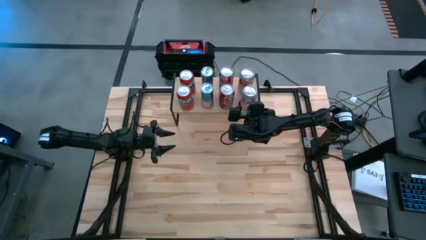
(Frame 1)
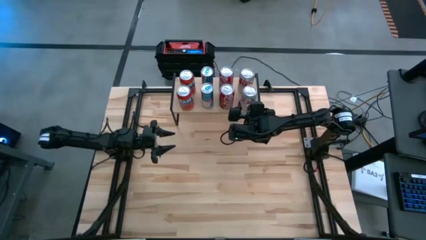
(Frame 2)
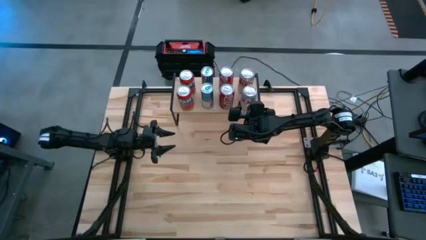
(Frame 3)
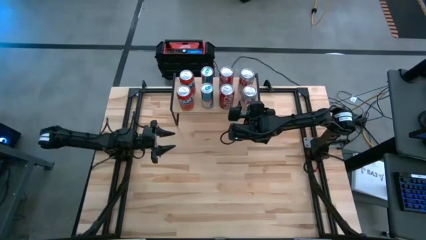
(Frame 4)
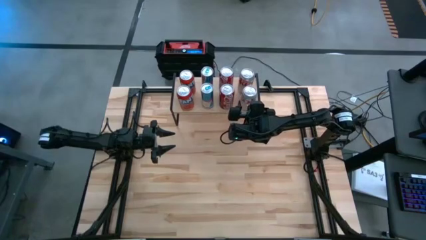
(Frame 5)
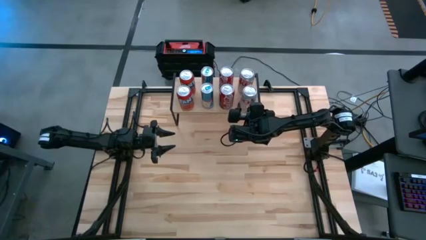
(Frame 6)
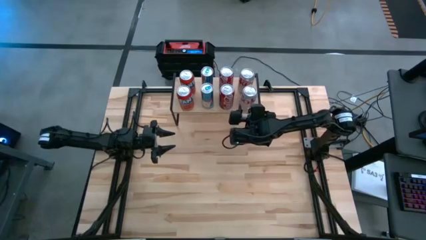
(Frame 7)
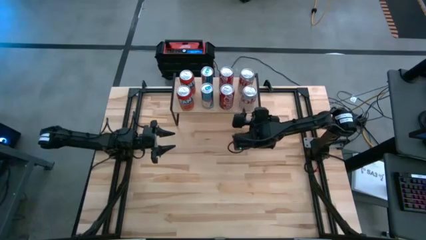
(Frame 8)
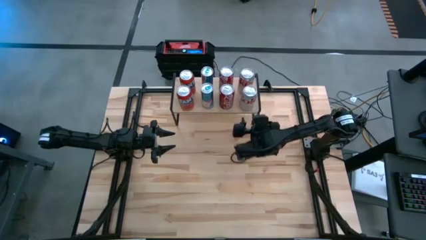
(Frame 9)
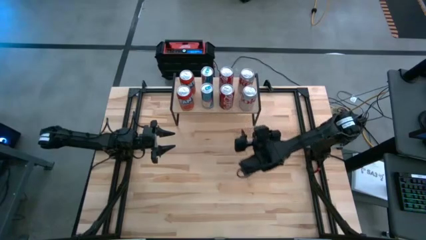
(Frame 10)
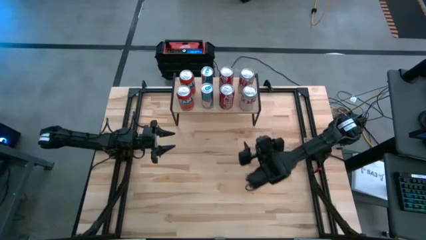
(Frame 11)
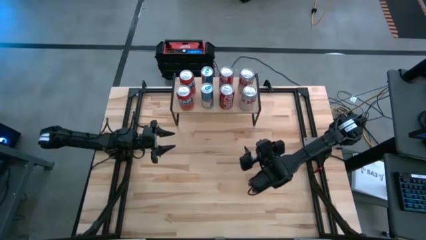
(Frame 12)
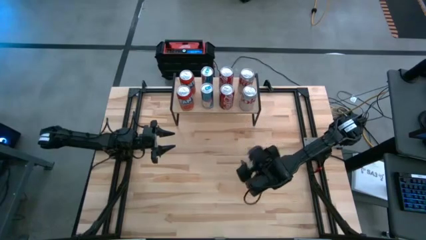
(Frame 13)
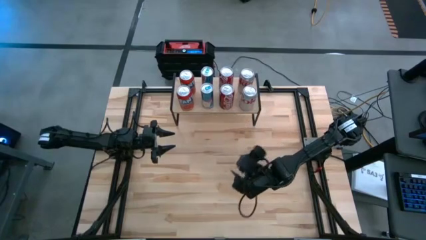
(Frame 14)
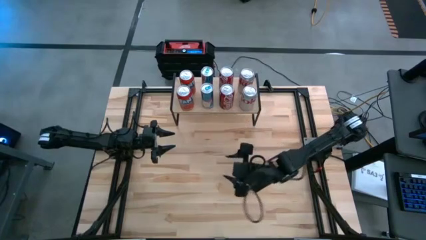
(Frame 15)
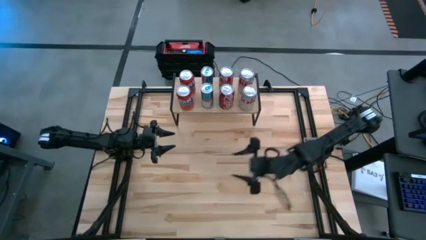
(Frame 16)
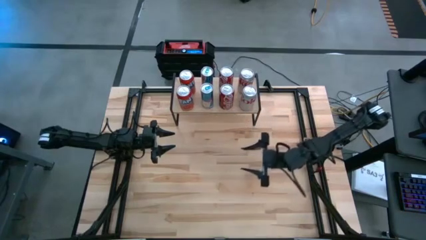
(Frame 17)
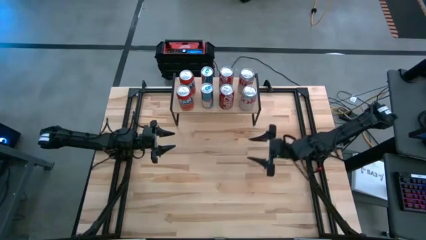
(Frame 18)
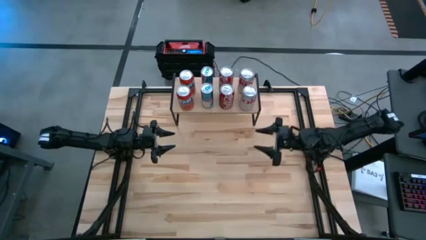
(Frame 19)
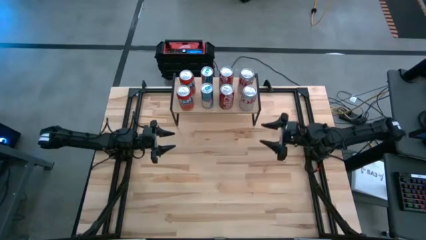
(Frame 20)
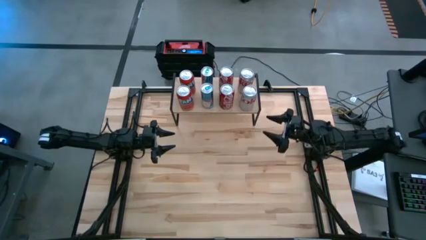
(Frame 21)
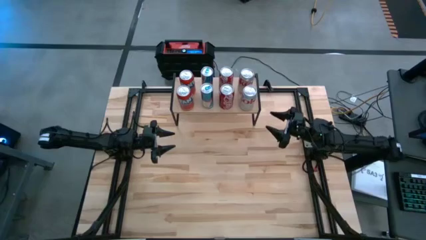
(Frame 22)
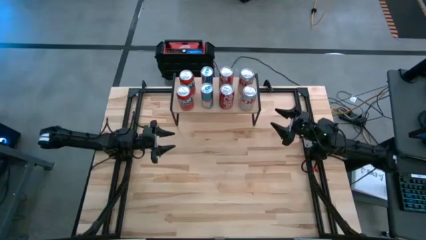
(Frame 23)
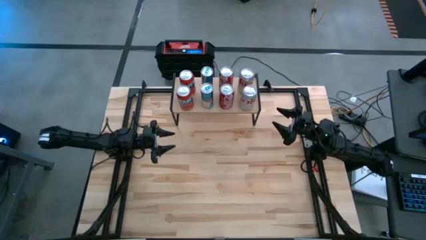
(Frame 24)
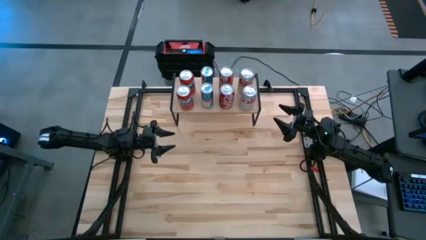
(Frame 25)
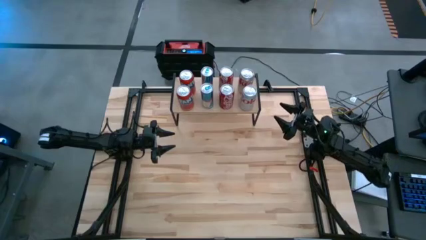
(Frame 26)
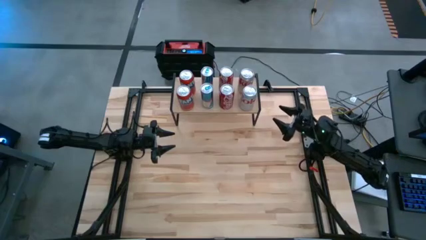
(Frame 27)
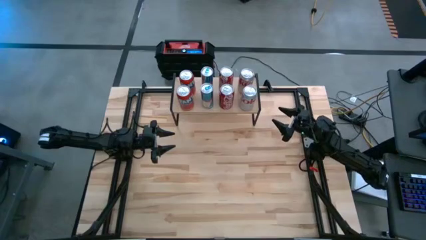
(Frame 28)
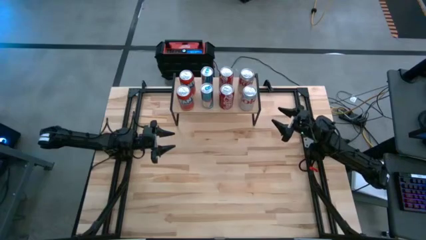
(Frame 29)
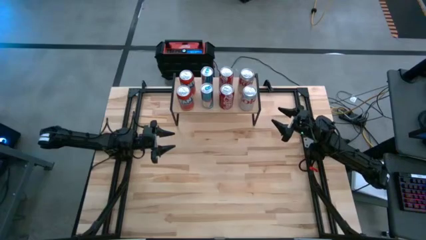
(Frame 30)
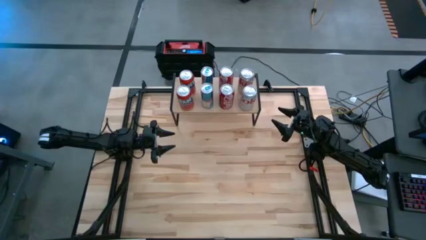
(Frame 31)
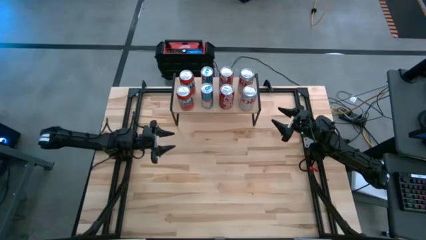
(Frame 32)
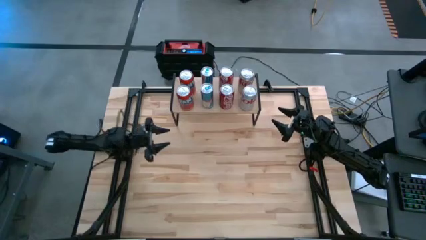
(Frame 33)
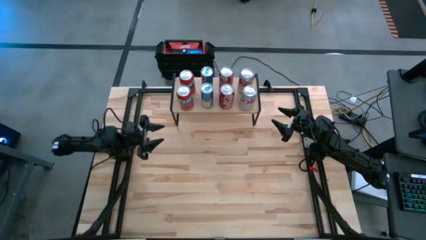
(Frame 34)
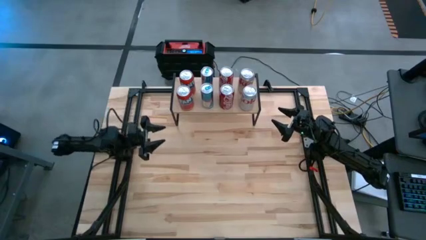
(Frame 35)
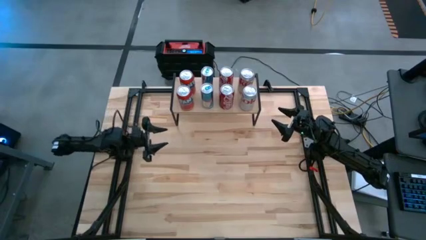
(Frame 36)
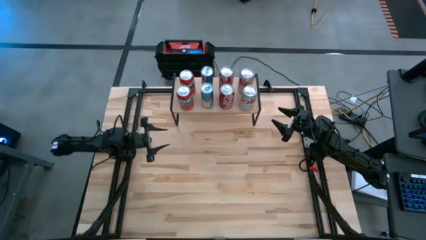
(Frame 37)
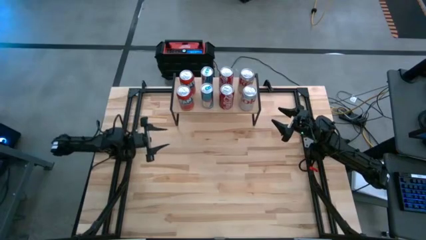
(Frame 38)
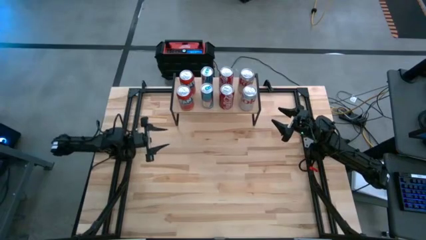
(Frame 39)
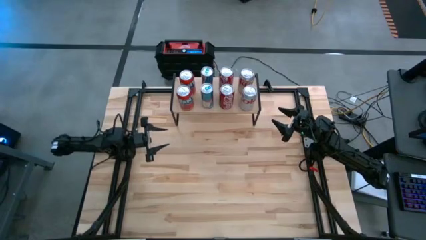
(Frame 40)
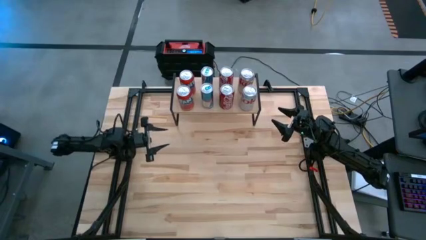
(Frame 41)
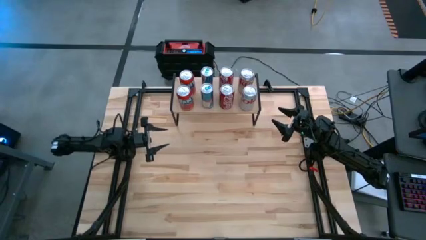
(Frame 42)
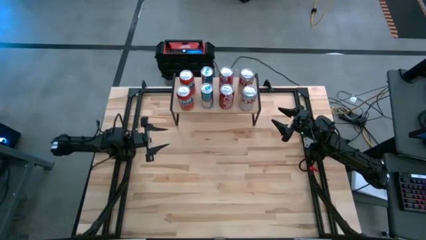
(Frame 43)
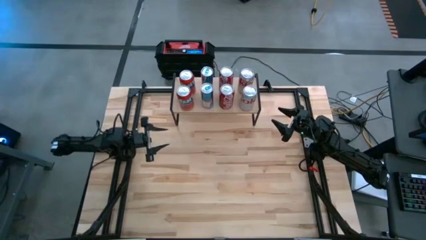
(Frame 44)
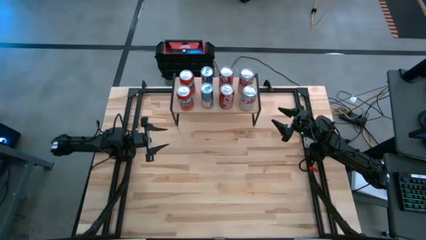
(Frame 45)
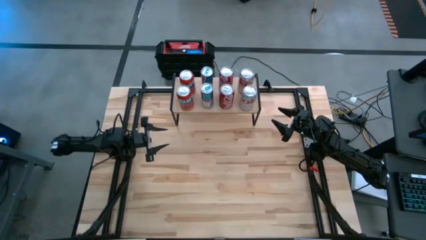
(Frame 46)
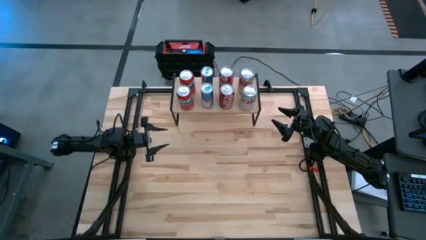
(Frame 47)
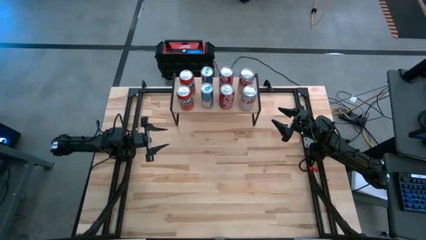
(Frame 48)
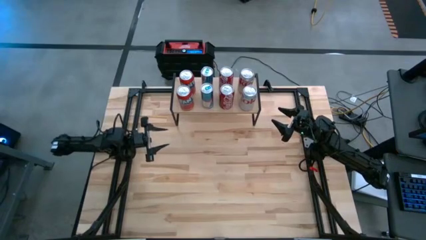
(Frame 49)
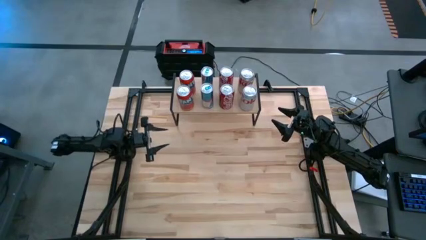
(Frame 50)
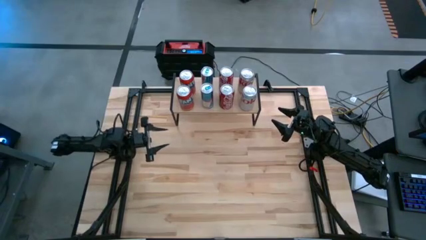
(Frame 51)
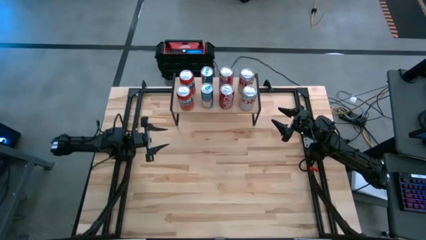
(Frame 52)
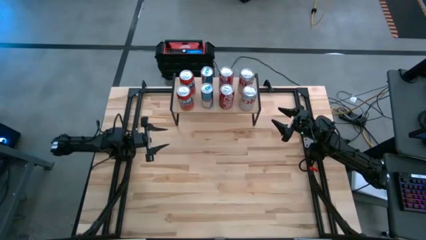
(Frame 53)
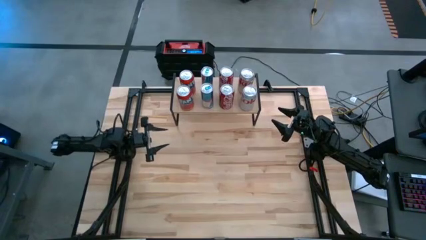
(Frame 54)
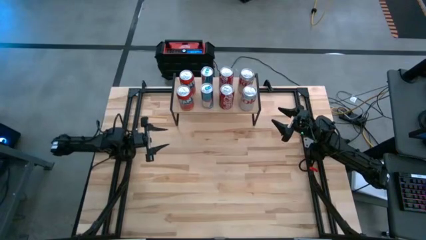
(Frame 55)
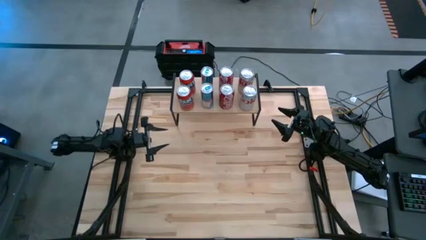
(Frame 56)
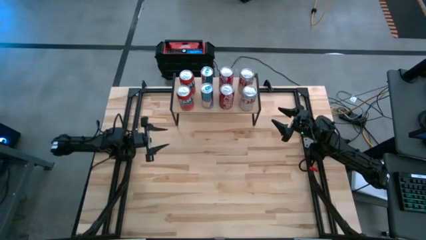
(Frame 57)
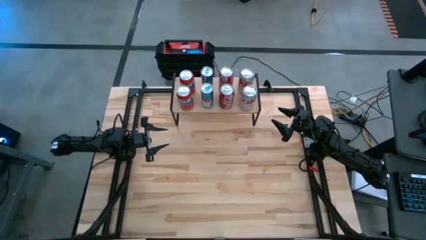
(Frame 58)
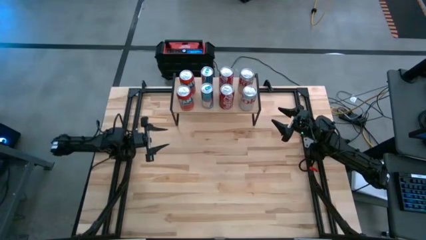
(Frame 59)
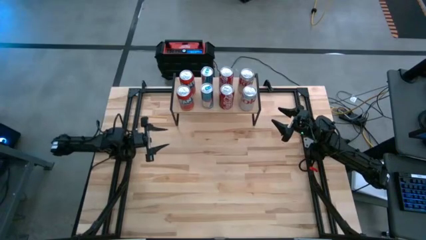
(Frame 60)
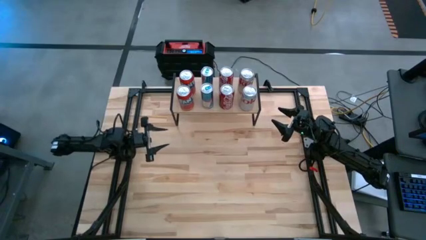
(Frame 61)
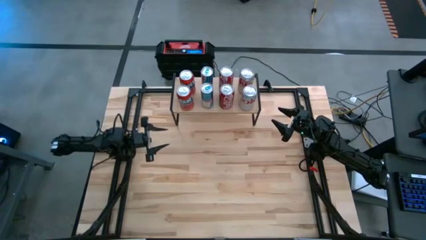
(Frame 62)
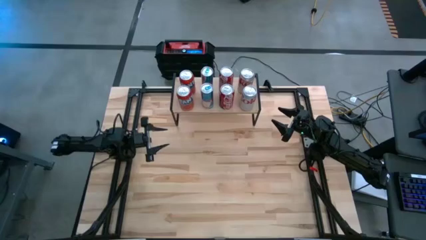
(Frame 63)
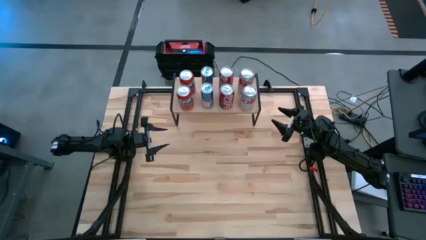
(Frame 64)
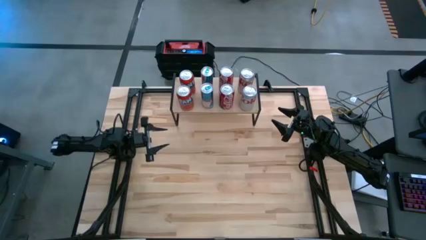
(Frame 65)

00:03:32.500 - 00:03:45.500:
Task: Place canned beverage on shelf
Return to Home Position
